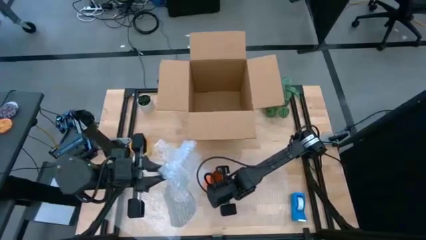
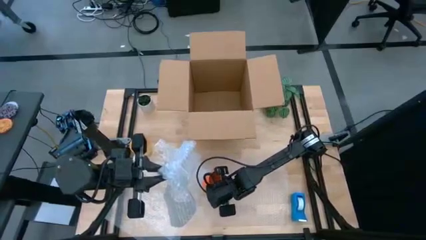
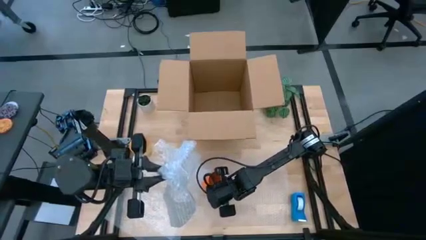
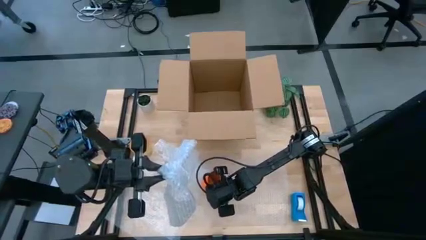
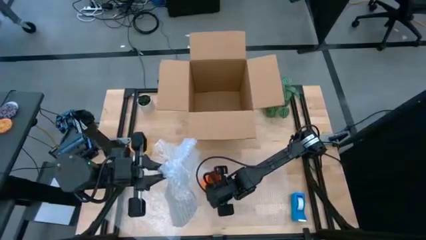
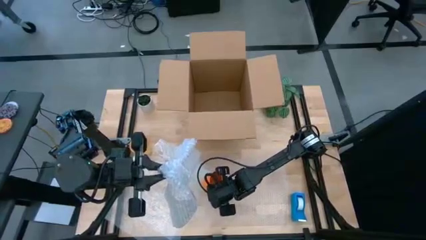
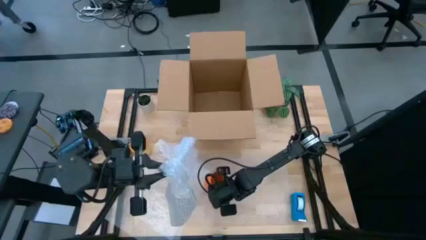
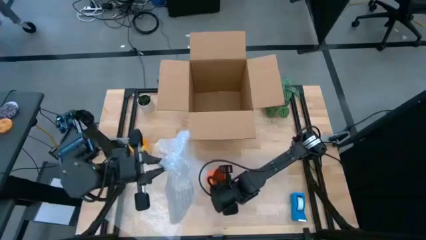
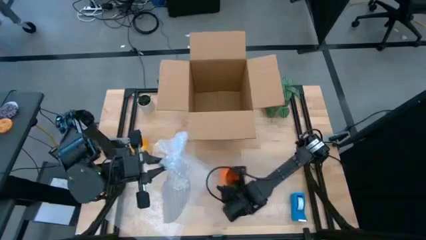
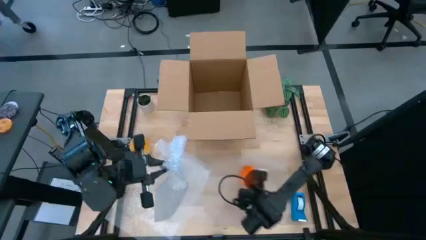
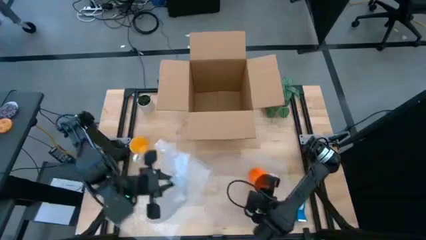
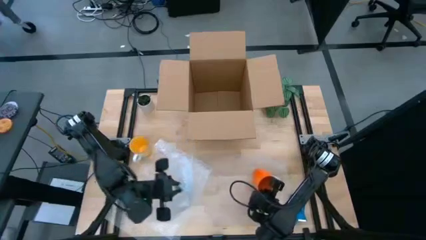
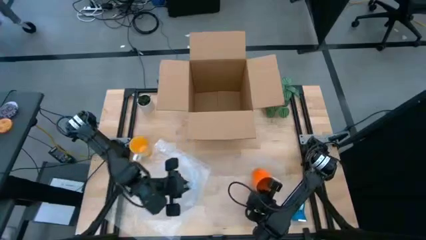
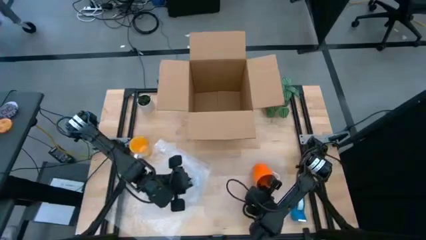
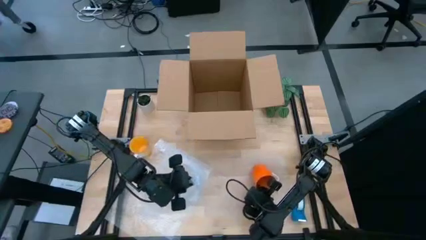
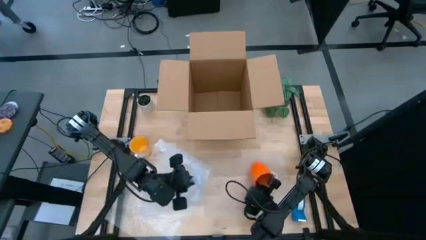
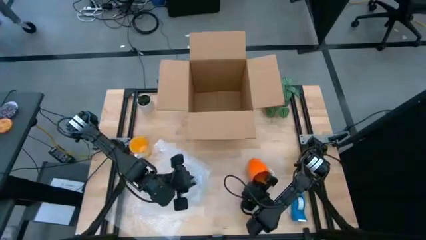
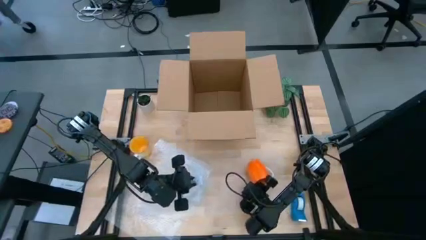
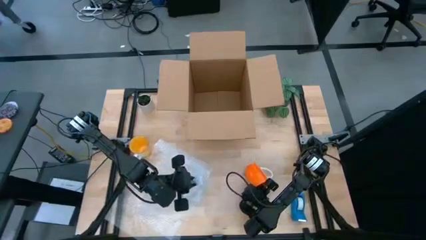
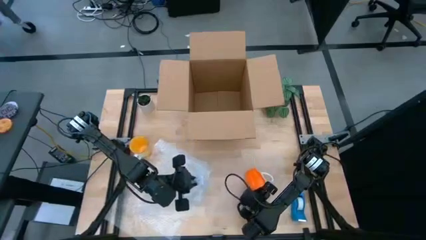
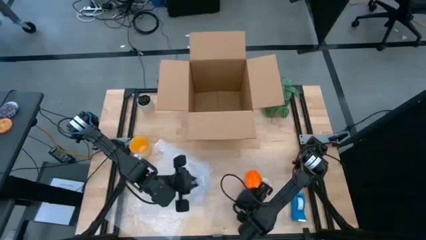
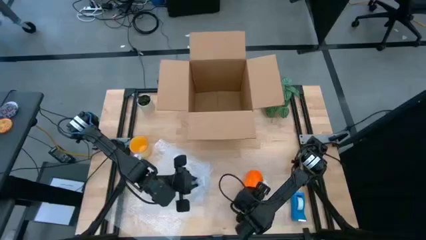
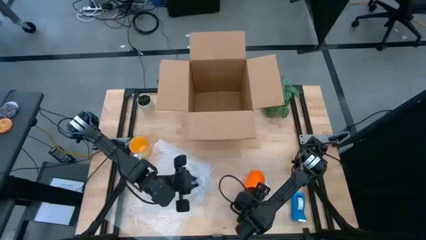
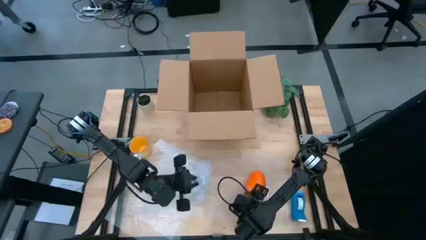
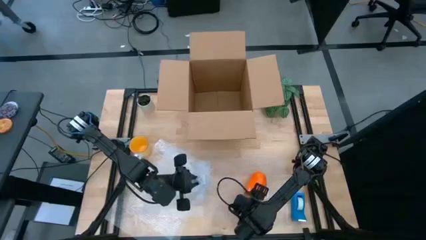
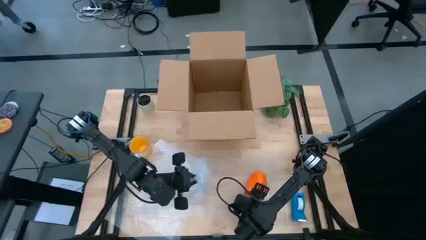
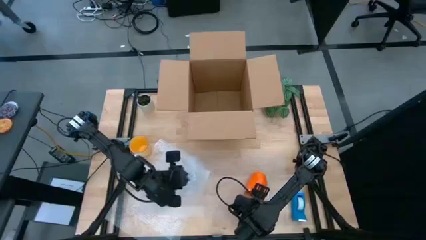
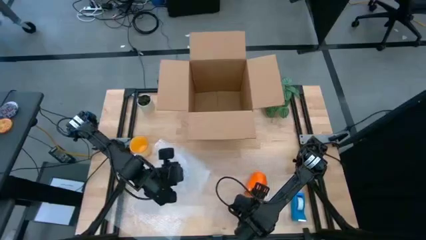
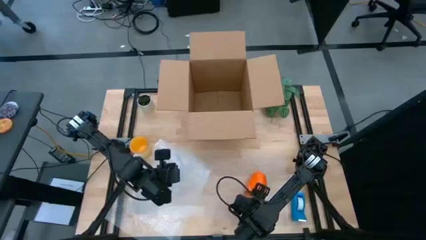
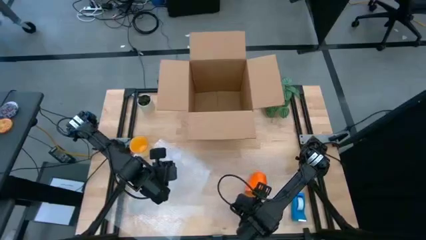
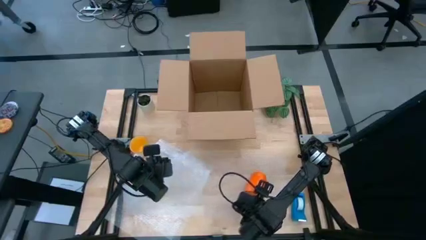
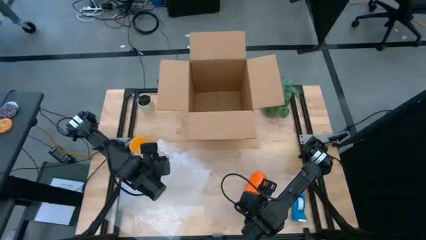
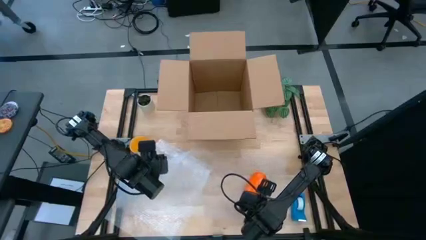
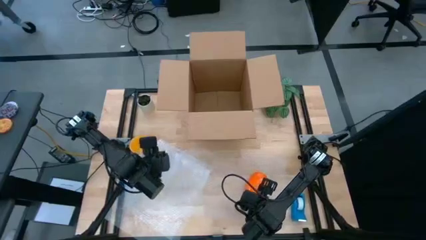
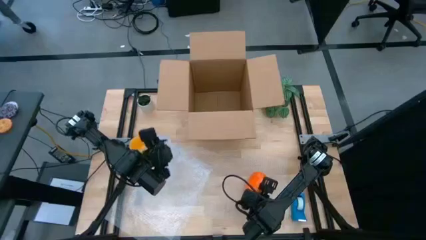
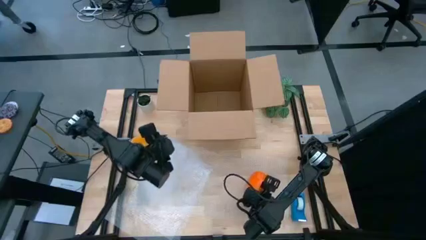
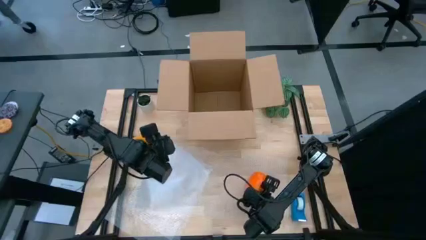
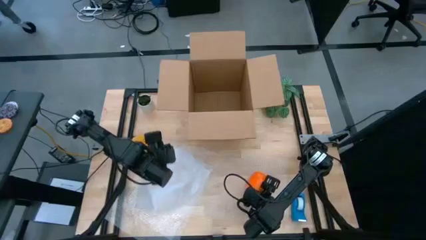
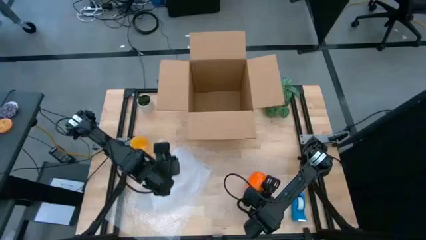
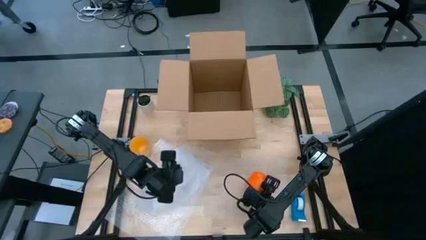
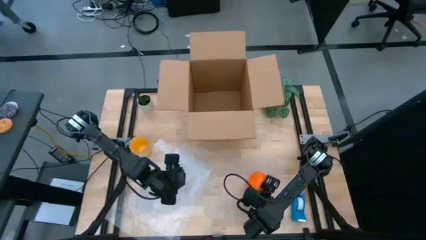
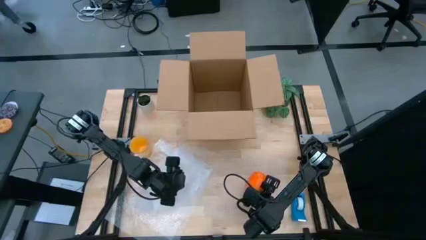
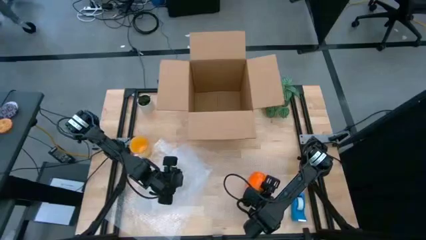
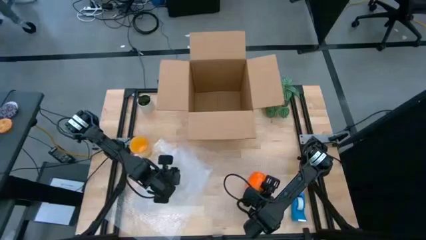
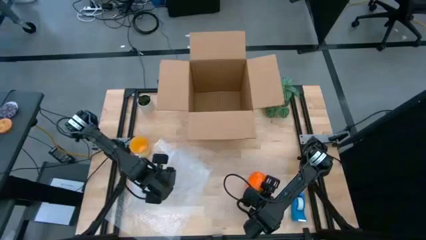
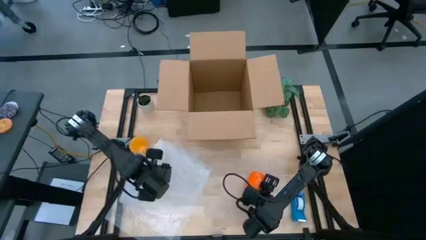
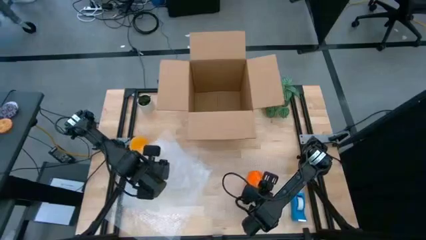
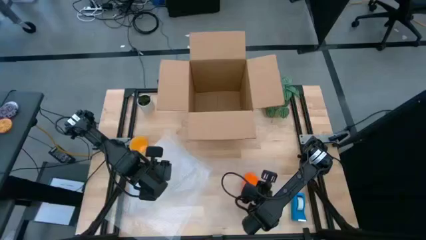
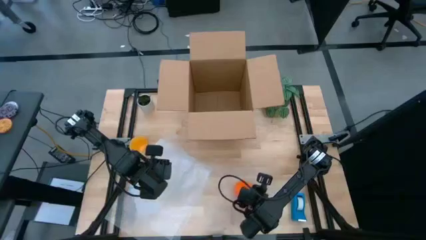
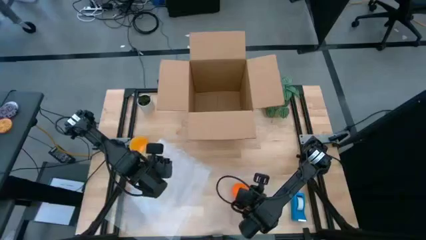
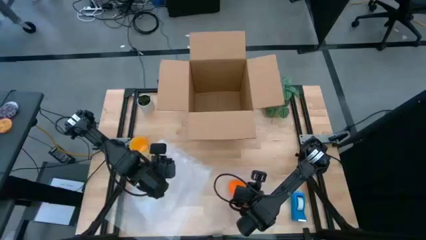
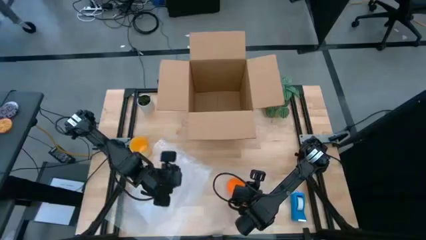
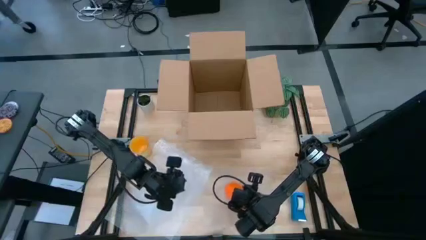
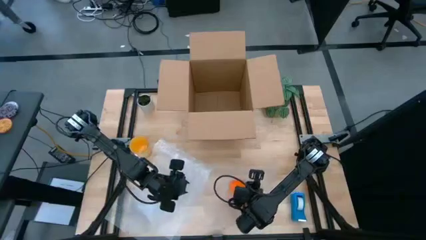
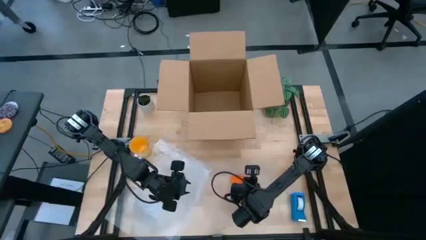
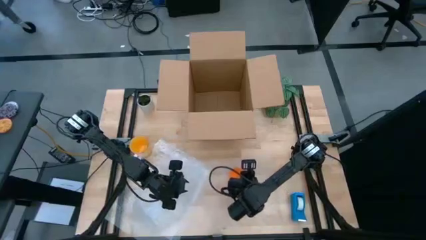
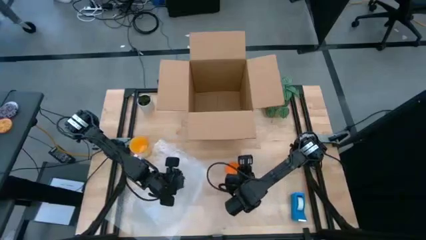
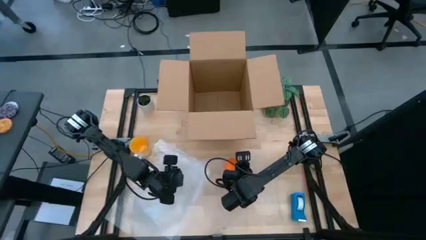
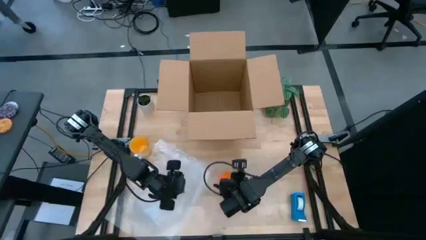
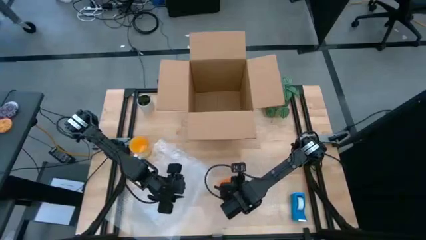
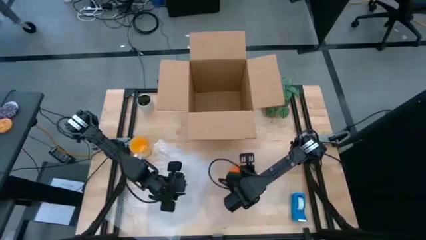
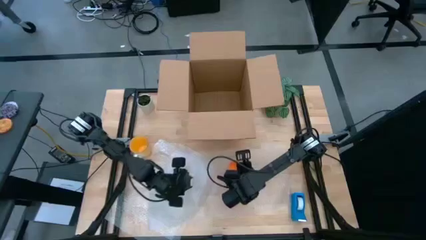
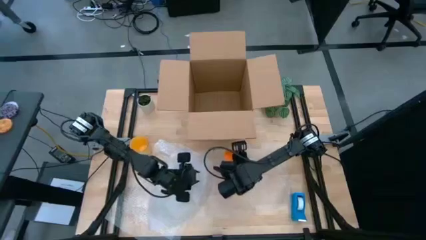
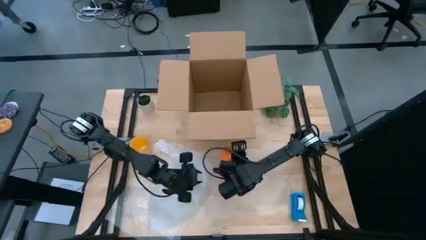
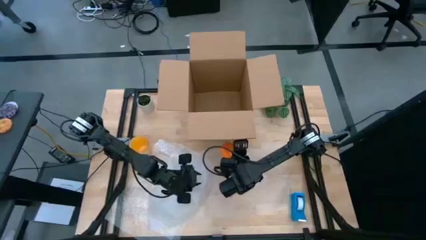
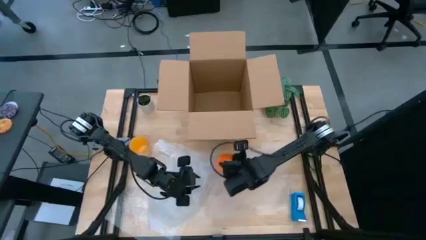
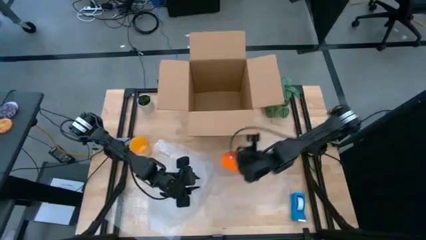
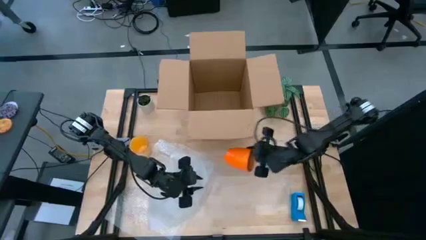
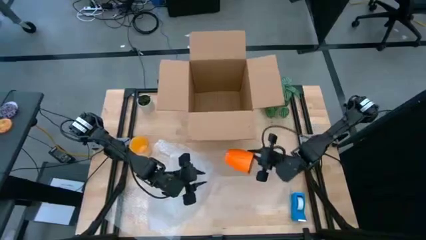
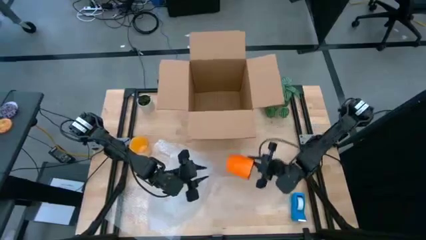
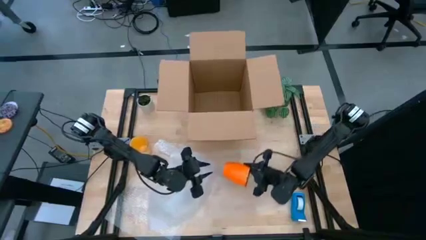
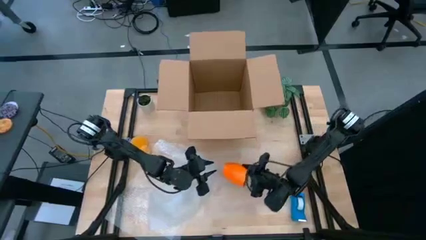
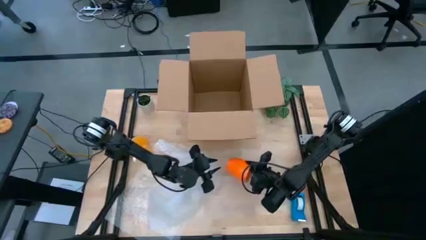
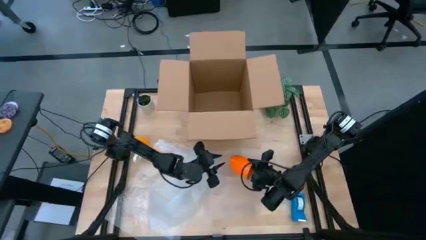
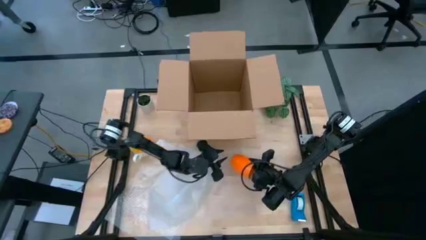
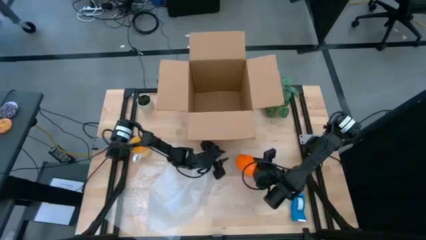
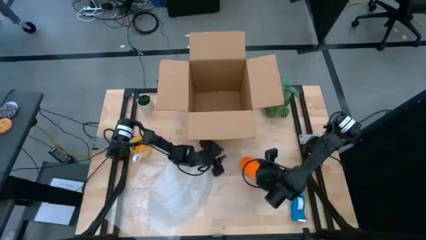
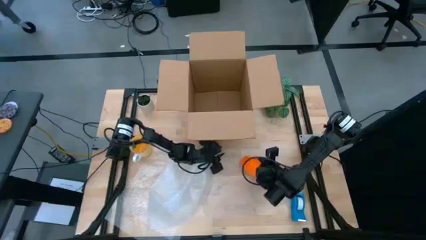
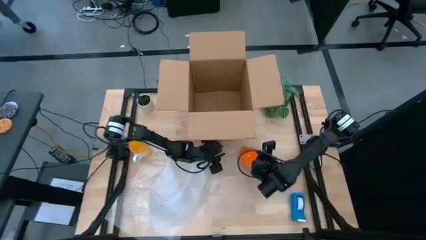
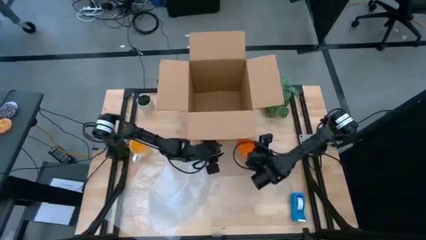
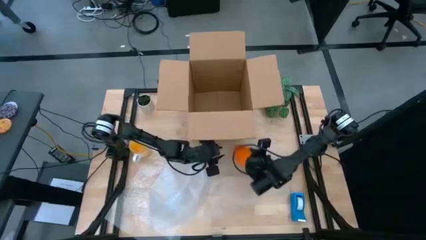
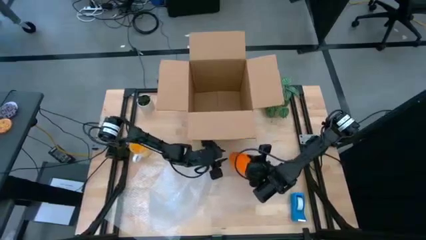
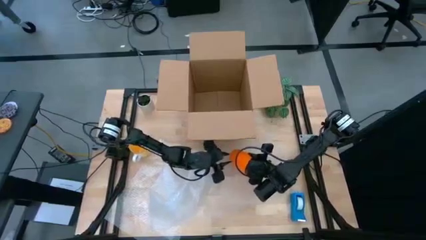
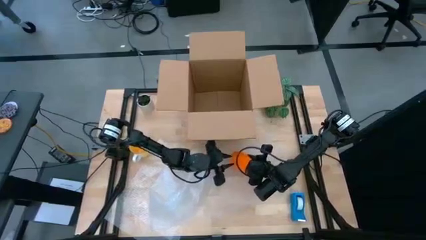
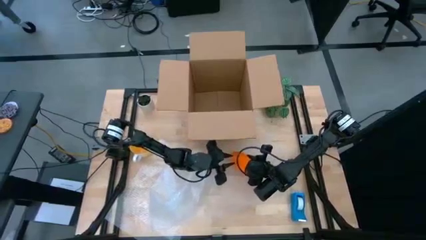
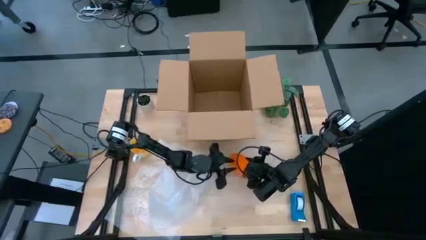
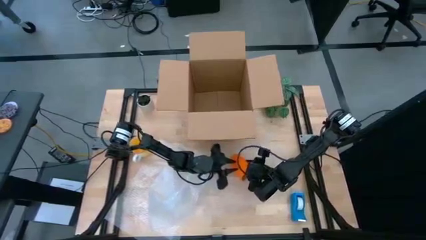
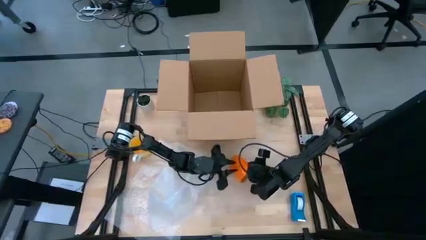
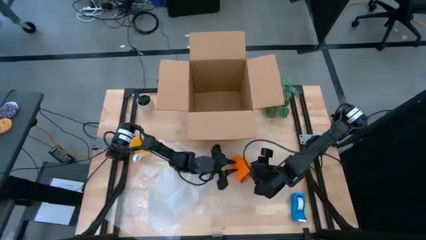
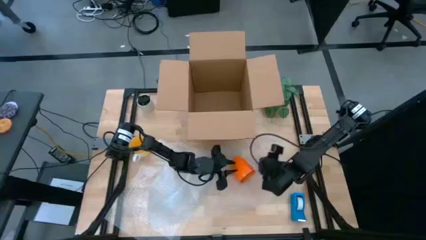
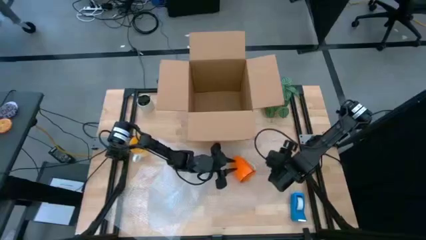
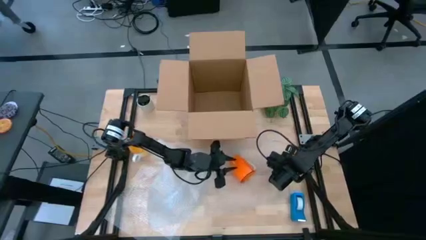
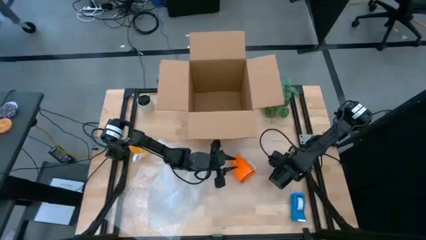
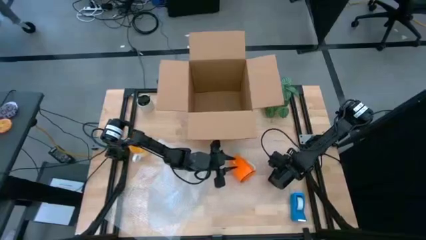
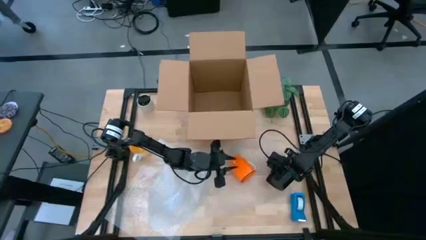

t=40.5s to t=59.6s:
Task: wrap mug
Wrap the orange mug with the bubble wrap
